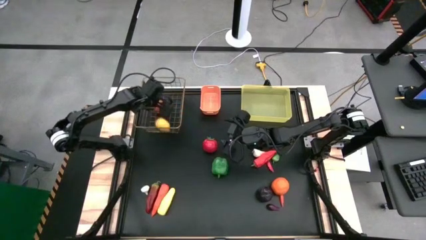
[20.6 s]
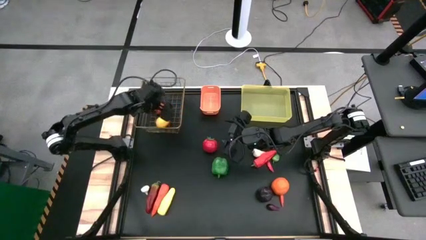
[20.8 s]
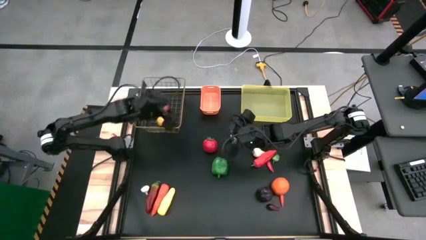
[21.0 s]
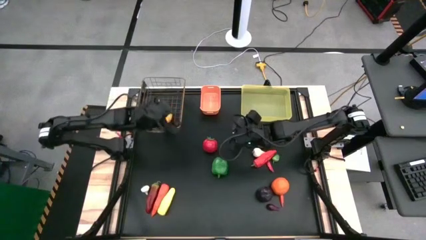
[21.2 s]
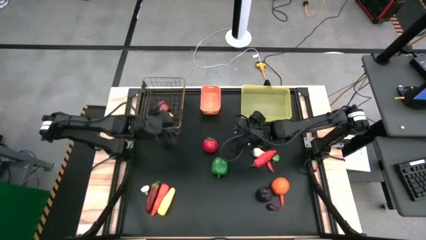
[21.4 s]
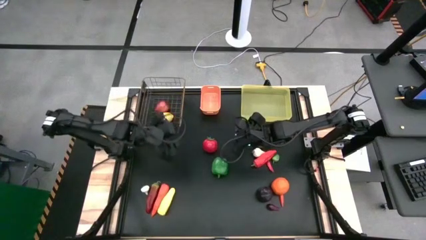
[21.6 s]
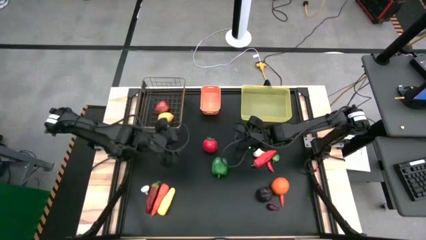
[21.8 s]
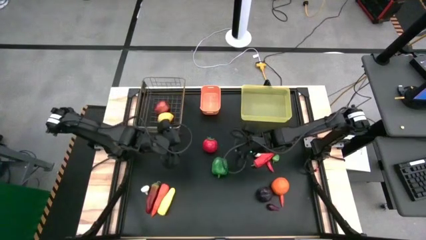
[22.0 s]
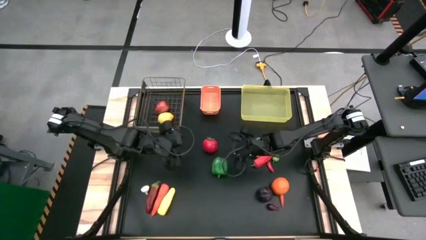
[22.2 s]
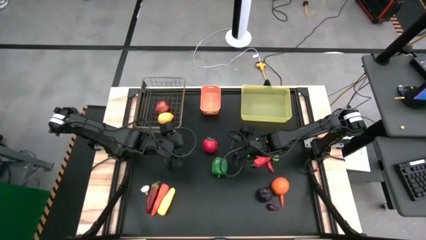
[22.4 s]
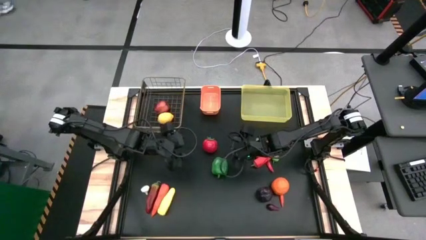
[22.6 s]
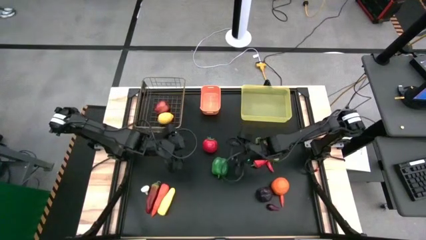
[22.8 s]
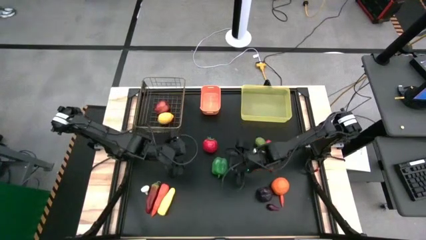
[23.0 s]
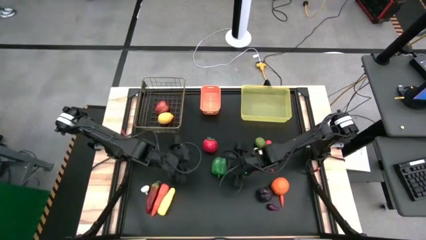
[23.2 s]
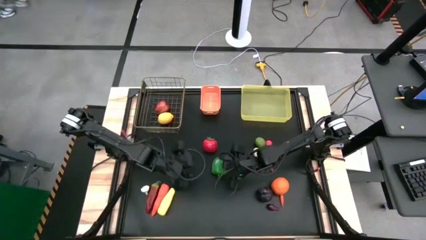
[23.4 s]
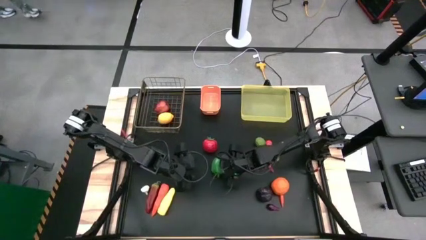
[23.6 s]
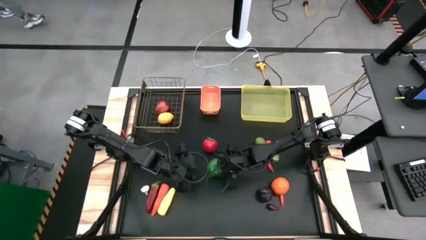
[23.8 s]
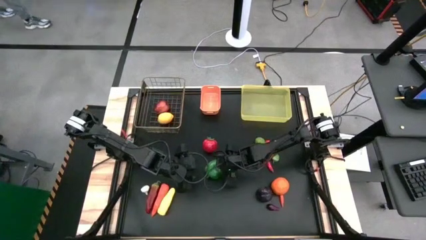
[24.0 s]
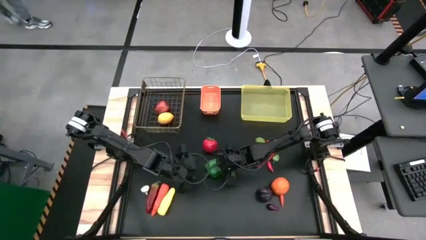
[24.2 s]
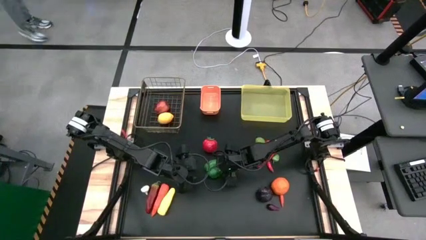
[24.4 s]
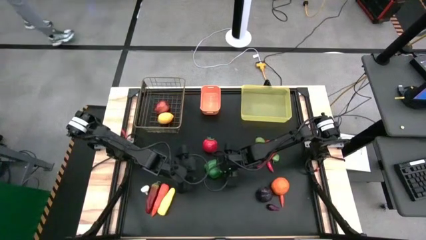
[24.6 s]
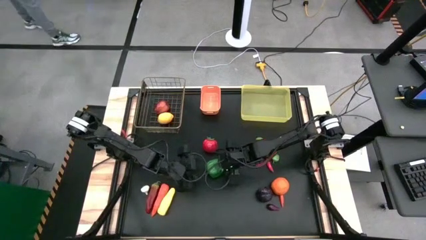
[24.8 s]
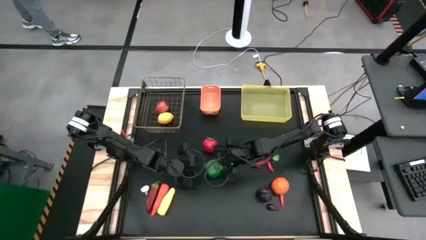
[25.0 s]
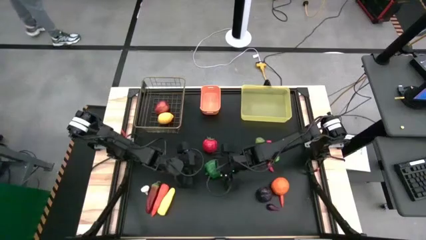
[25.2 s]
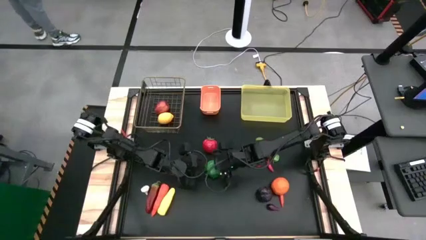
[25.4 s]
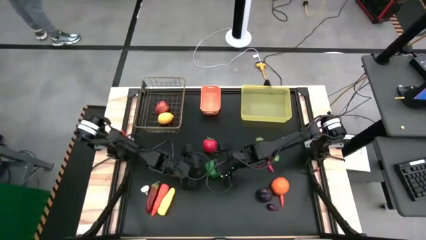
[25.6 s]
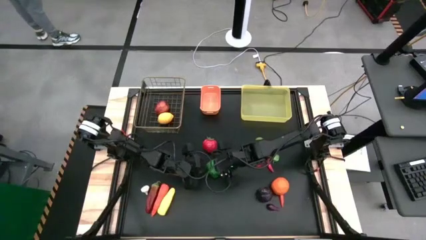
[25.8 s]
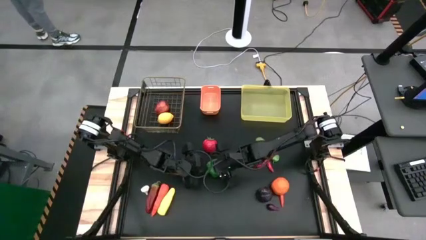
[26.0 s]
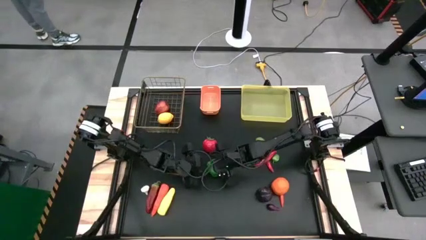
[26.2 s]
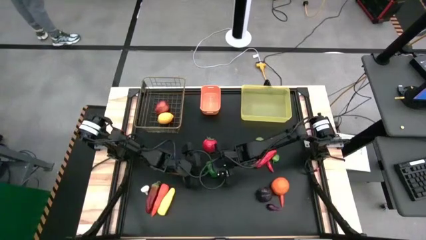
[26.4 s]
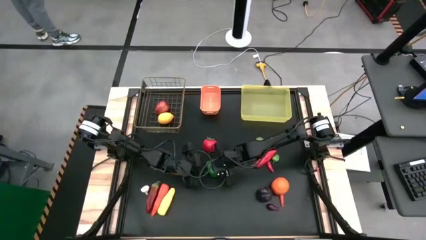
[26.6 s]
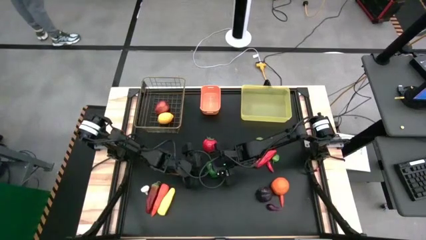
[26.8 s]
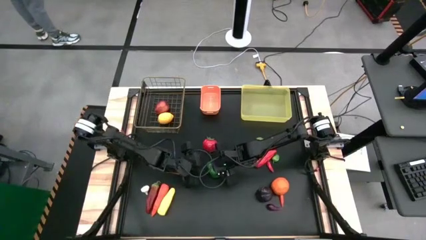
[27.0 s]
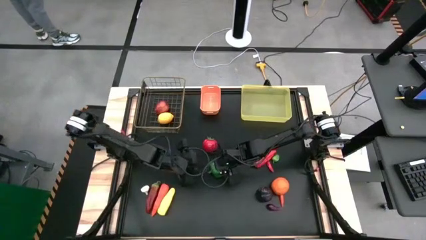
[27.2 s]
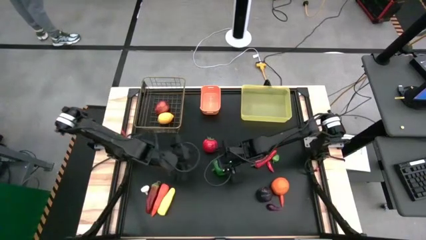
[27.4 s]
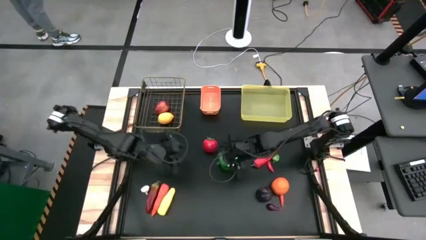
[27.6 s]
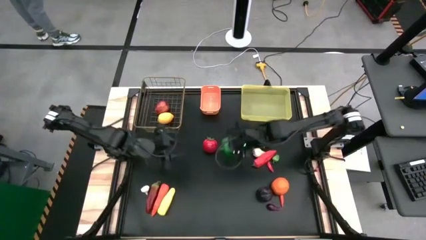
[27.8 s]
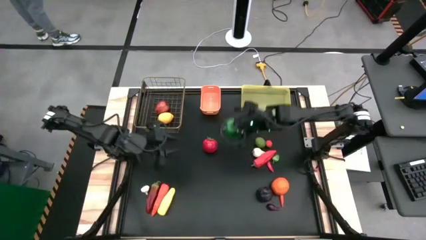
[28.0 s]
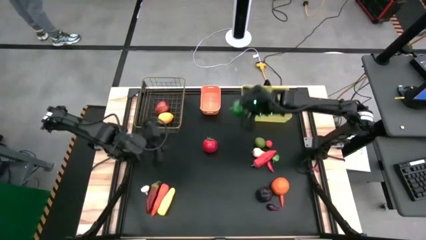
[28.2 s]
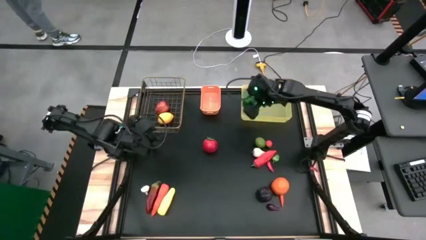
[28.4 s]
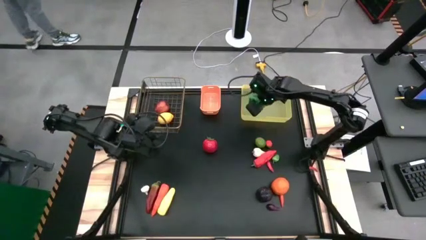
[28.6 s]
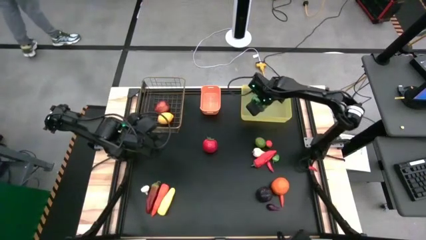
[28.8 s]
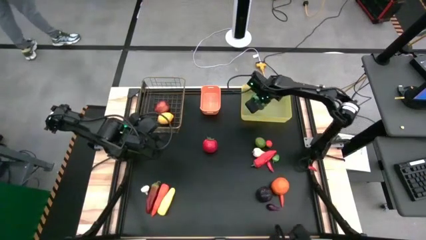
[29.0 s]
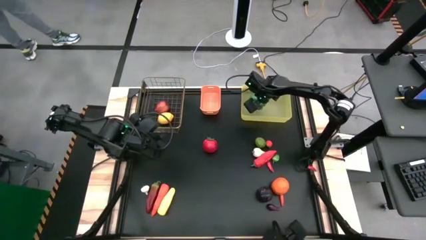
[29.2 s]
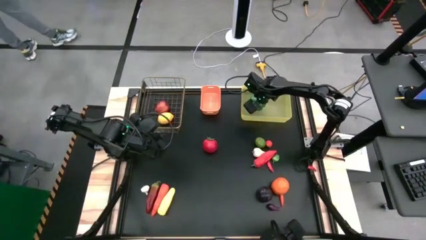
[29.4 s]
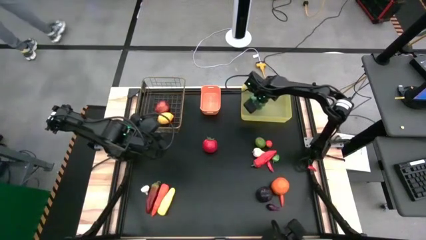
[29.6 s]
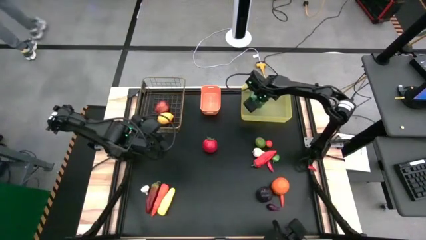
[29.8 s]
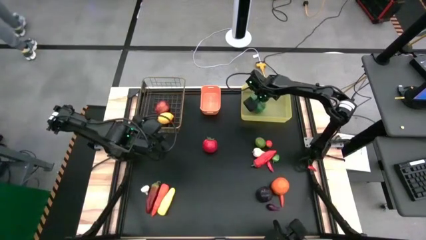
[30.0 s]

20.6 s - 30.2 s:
Task: Sort produce into baskets
Put the green bell pepper into the yellow bin

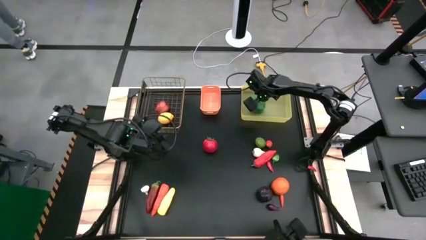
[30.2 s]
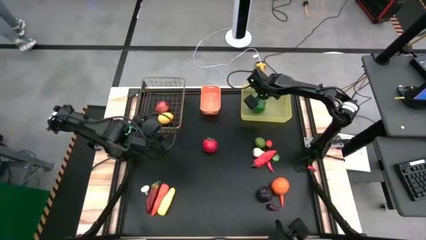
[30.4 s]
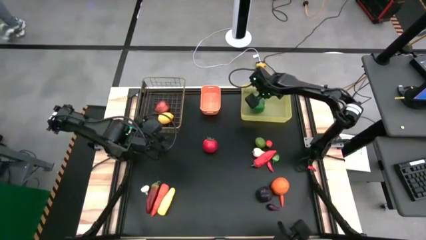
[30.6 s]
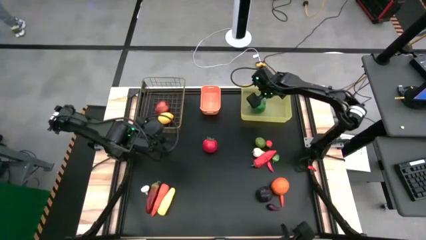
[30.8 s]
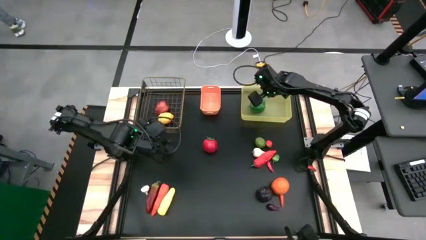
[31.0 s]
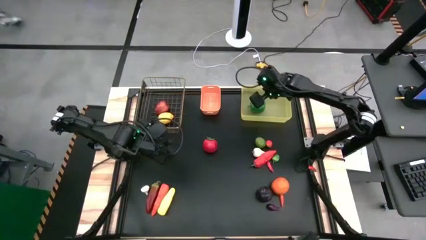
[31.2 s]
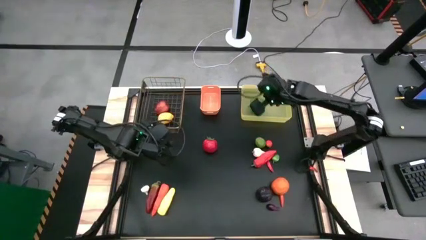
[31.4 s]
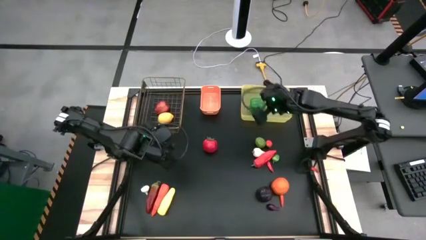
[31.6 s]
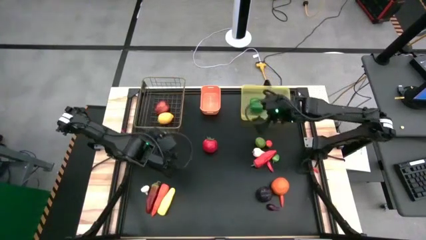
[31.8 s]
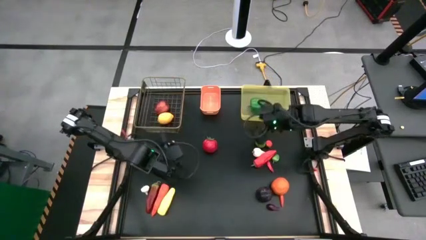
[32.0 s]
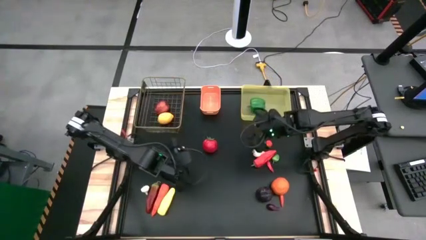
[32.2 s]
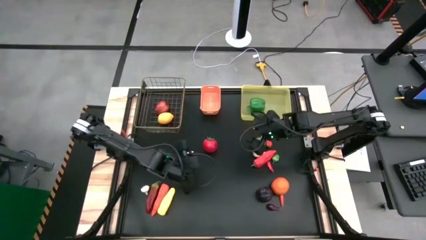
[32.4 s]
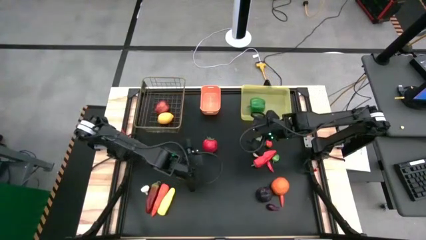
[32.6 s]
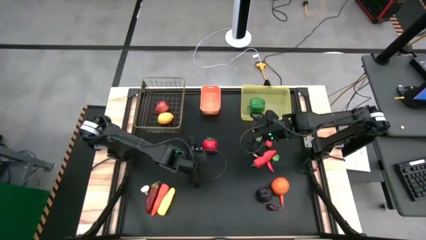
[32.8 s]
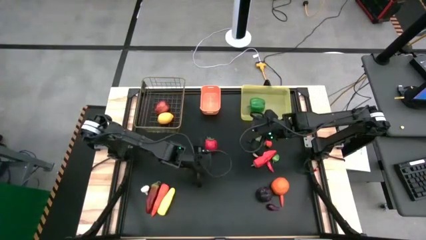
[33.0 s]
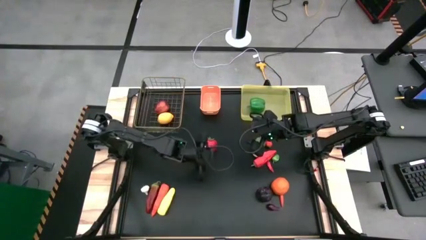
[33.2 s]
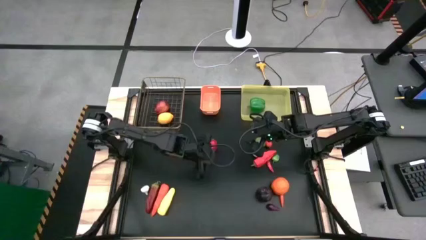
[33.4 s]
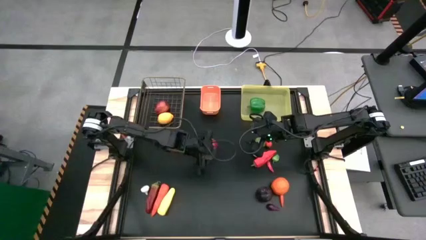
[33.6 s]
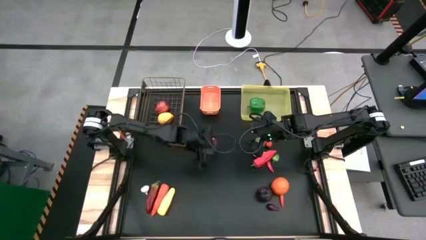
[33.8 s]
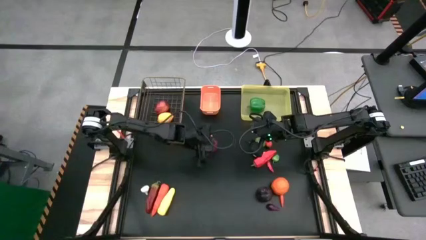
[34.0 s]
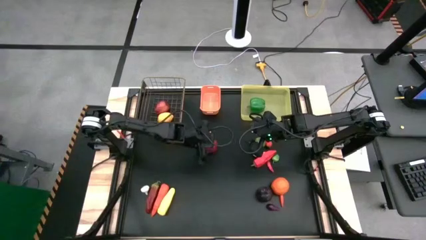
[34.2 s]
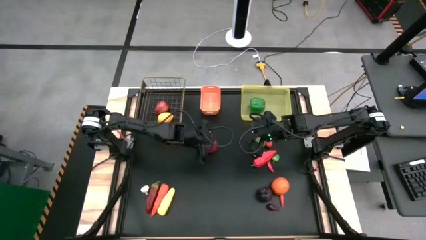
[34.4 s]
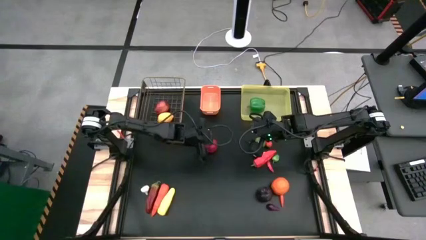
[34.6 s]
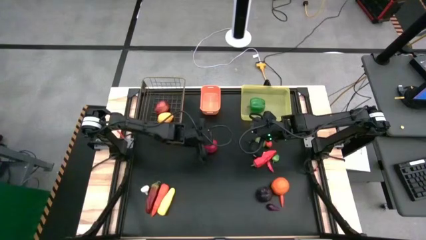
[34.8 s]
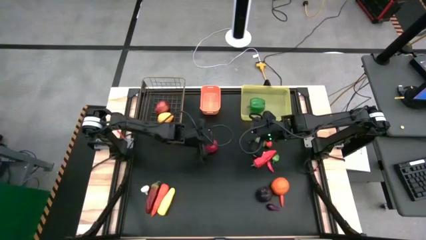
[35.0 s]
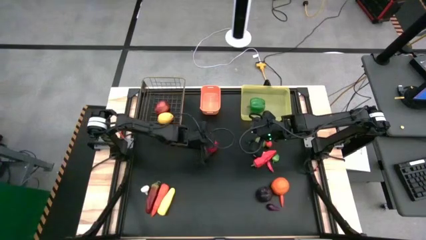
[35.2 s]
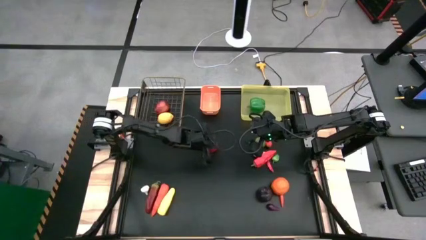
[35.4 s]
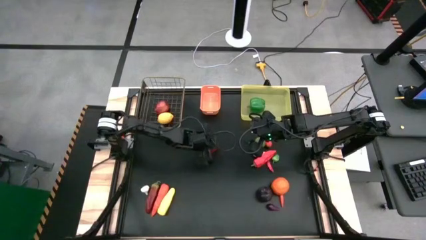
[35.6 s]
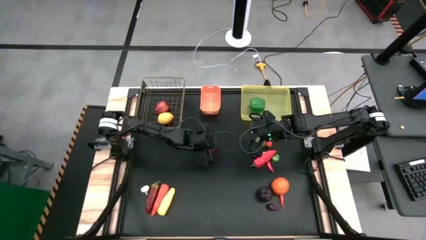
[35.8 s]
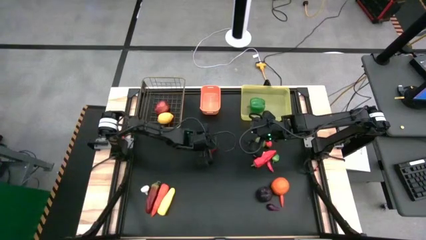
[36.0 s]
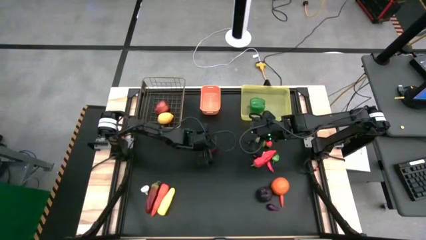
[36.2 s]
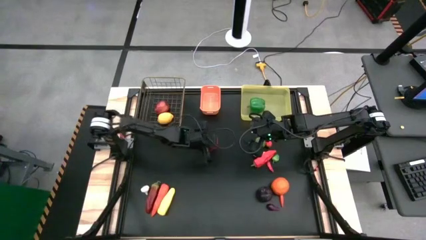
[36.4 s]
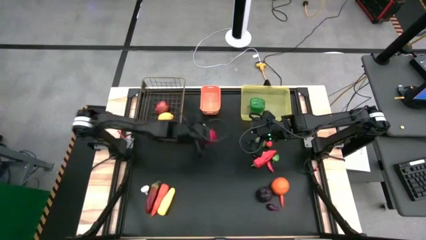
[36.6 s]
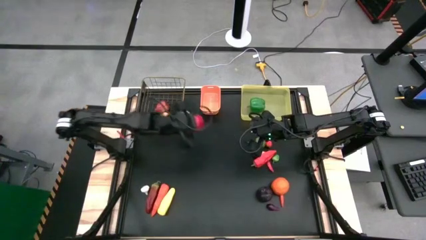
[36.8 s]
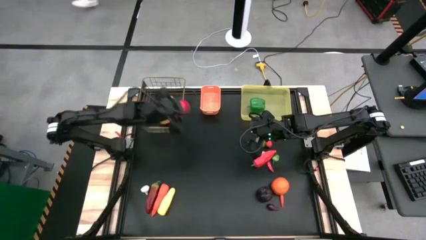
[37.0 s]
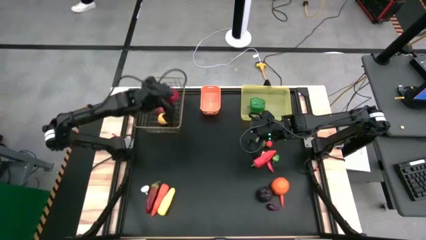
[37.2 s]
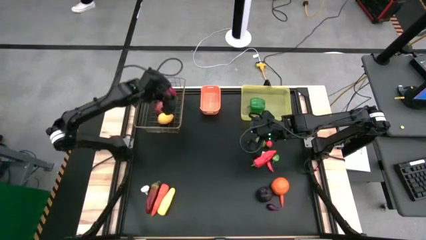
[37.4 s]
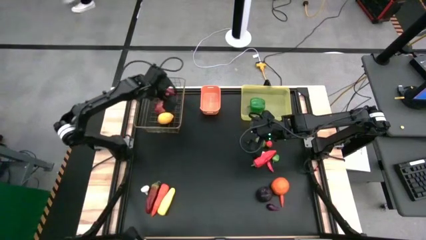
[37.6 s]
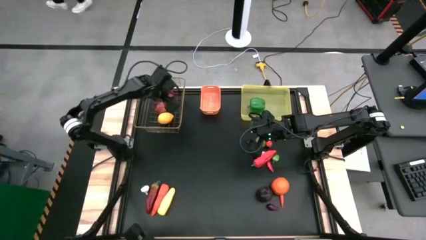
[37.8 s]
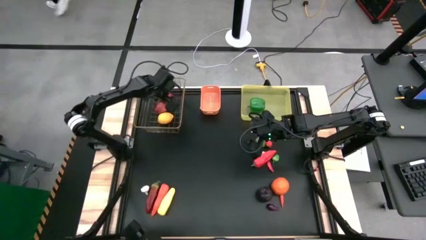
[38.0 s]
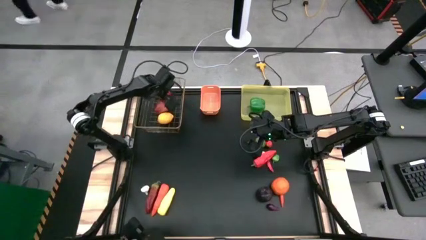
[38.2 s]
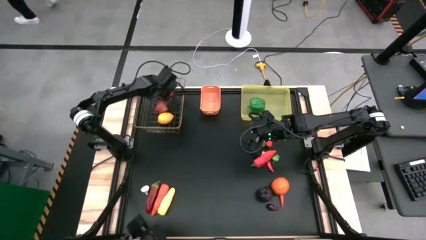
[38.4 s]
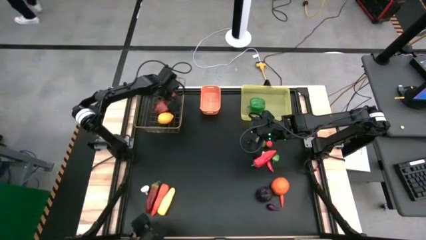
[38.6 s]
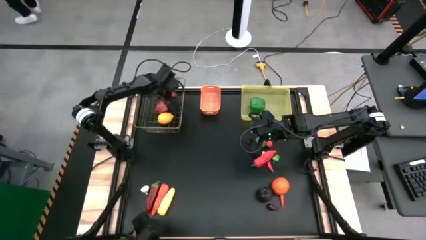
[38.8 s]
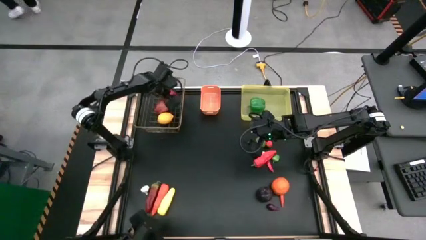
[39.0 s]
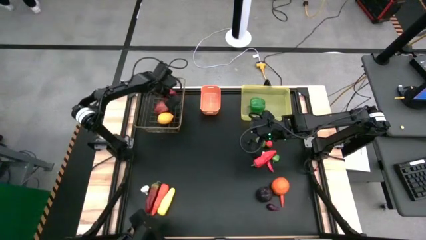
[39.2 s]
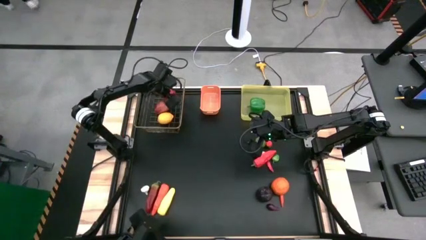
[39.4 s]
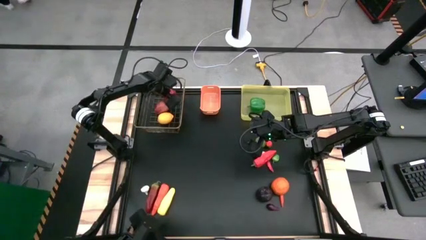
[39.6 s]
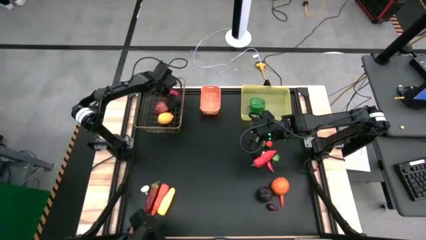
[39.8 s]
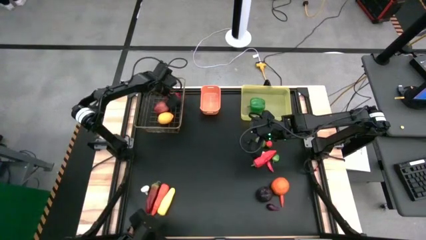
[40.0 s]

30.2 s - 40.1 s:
Put the red tomato into the wire basket
